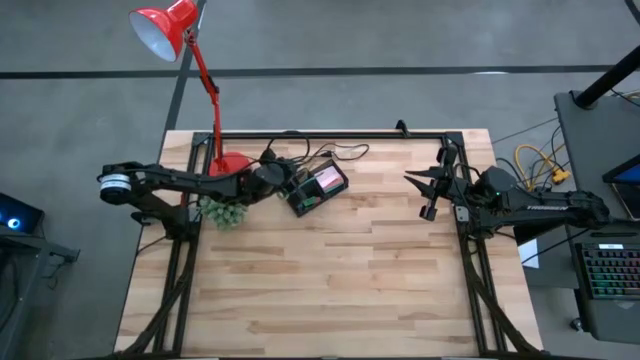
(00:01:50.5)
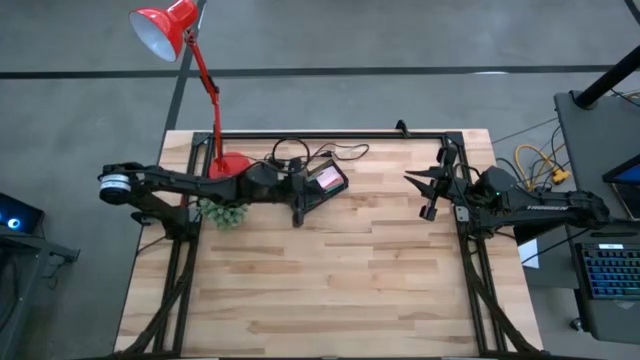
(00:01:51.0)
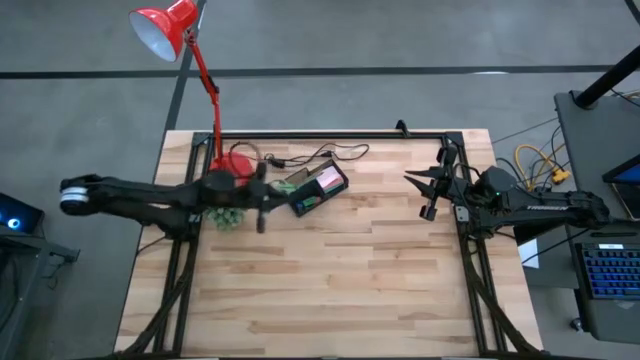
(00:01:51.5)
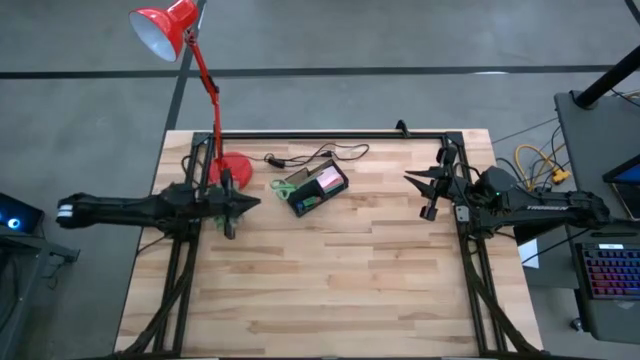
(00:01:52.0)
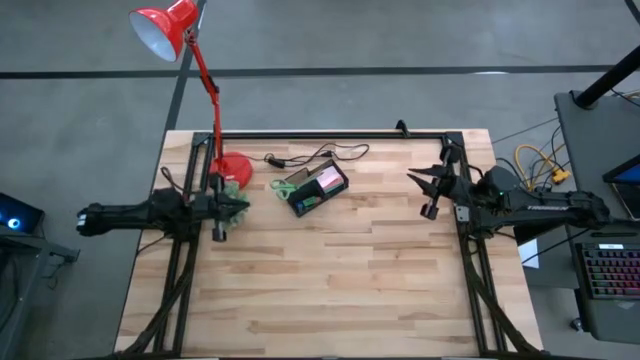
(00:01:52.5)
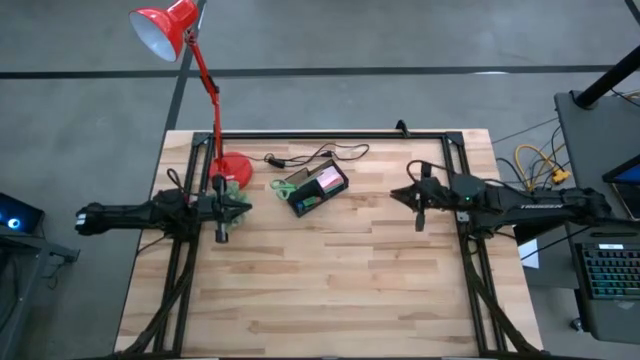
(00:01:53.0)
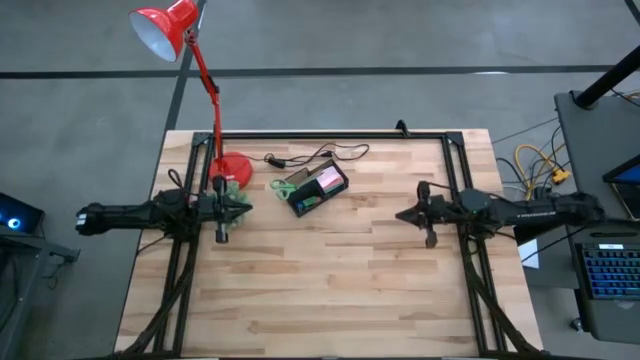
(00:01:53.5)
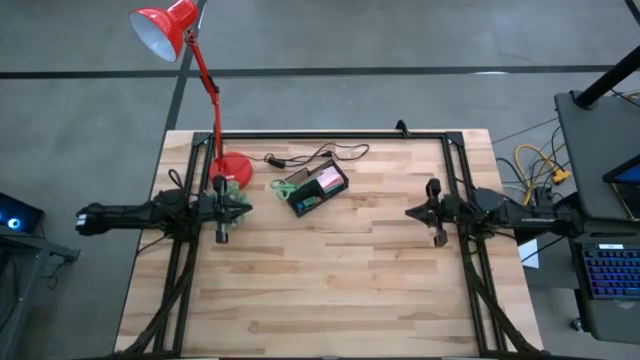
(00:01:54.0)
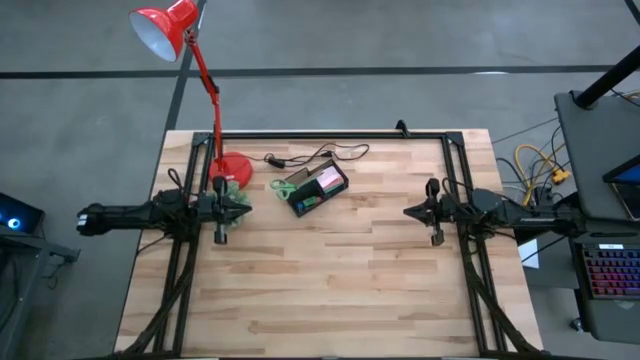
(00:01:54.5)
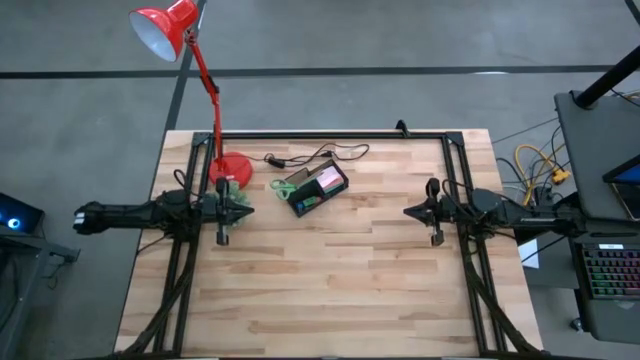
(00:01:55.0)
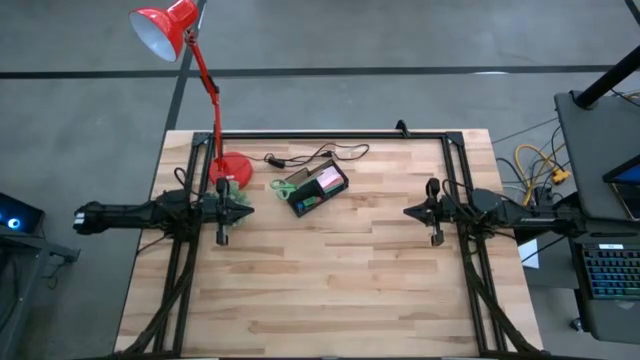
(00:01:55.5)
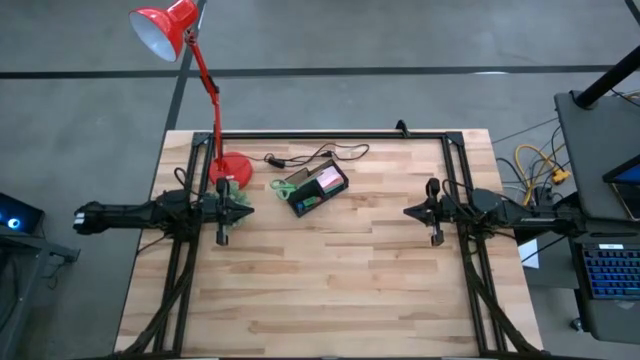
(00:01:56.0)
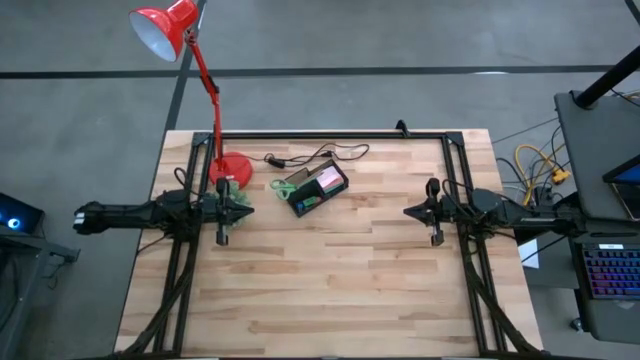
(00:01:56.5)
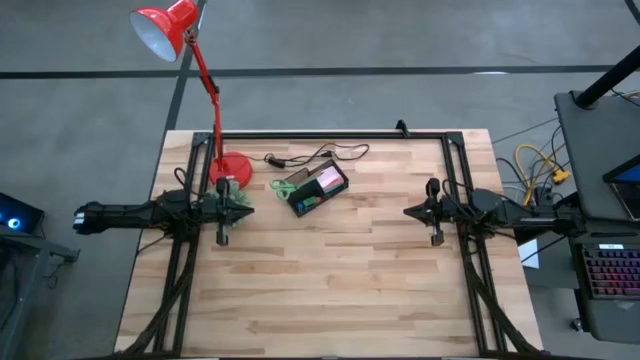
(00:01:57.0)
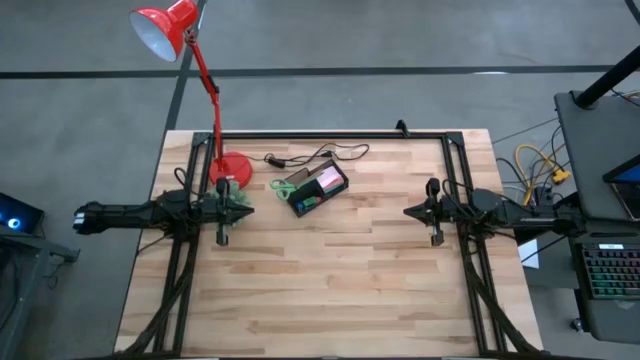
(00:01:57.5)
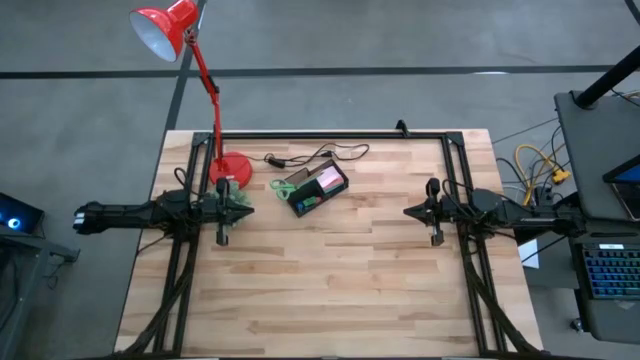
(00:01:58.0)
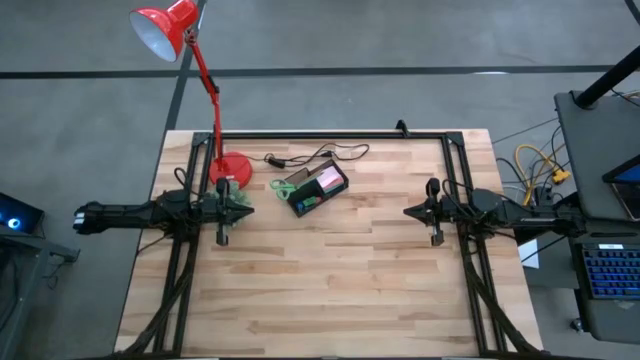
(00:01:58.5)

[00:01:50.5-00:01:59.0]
Task: Pick and place office supplies into organizer
Return to Home Position

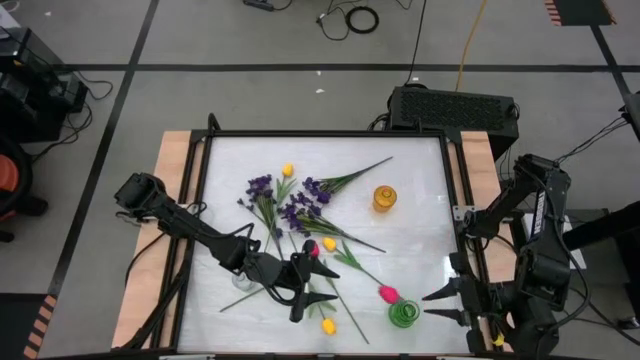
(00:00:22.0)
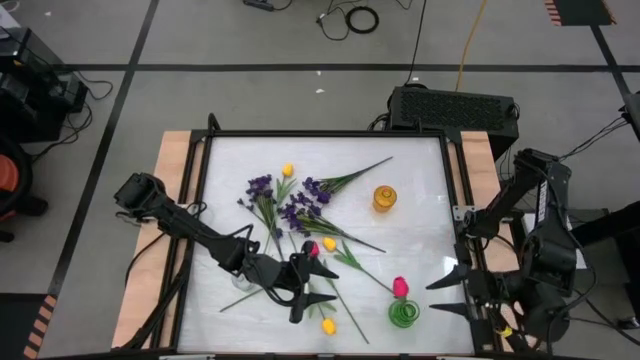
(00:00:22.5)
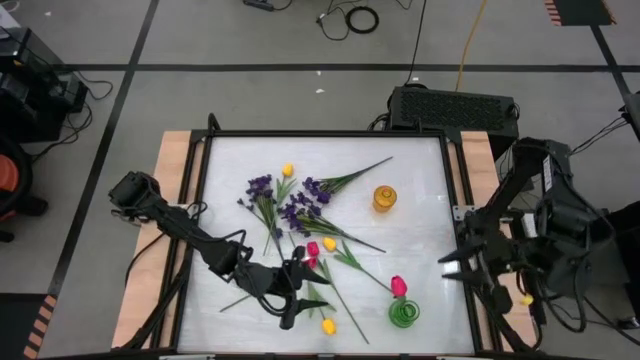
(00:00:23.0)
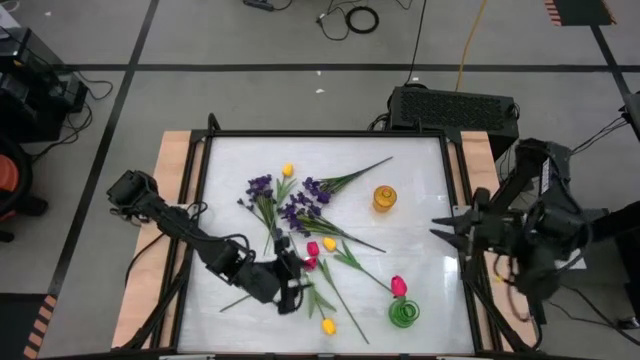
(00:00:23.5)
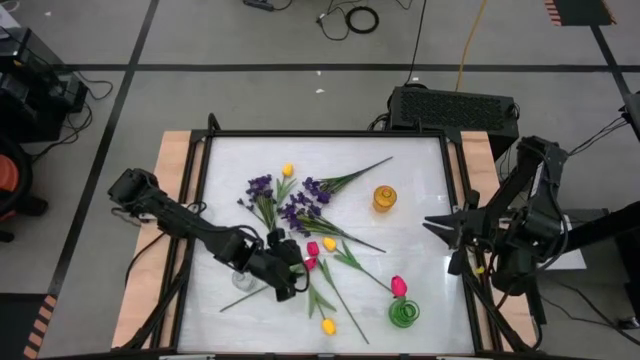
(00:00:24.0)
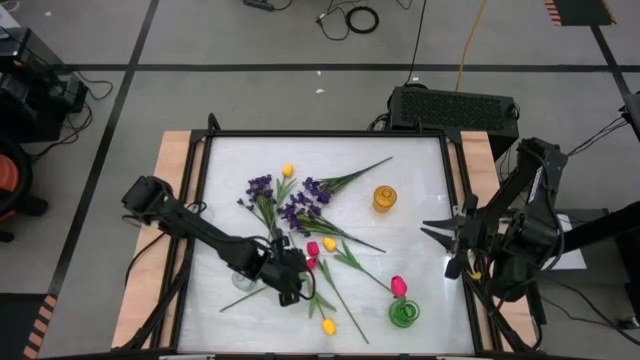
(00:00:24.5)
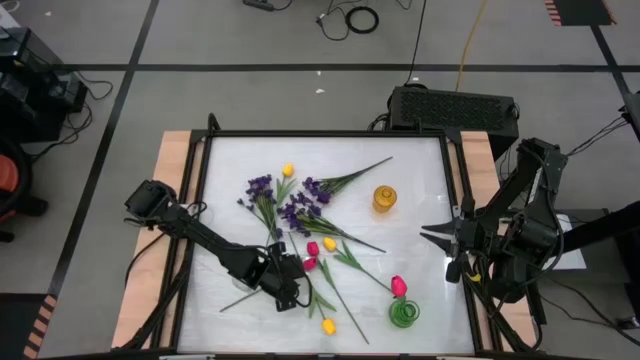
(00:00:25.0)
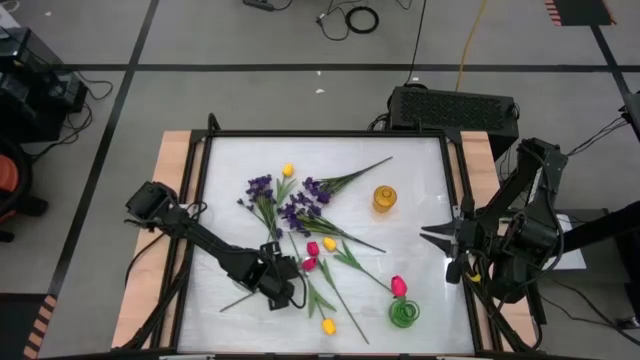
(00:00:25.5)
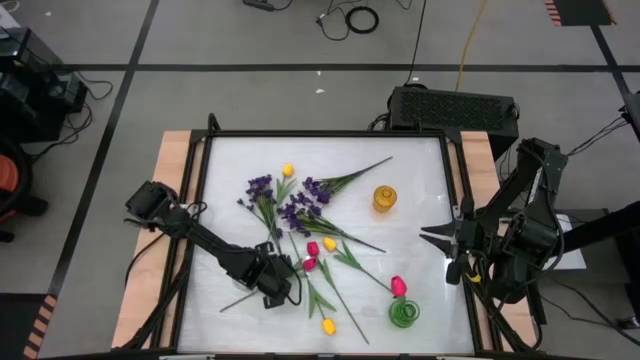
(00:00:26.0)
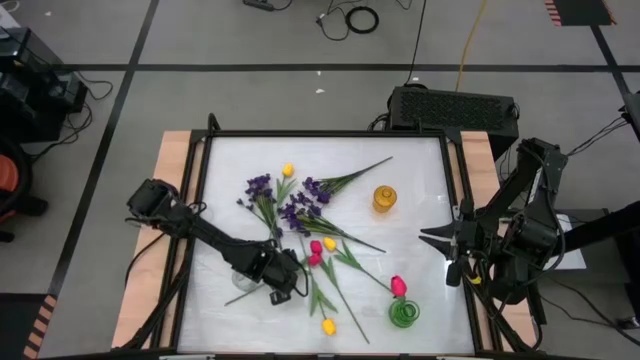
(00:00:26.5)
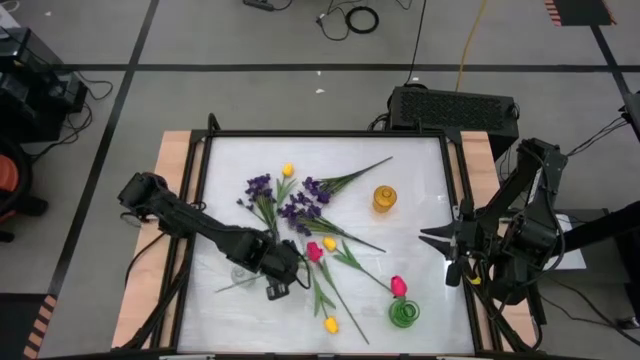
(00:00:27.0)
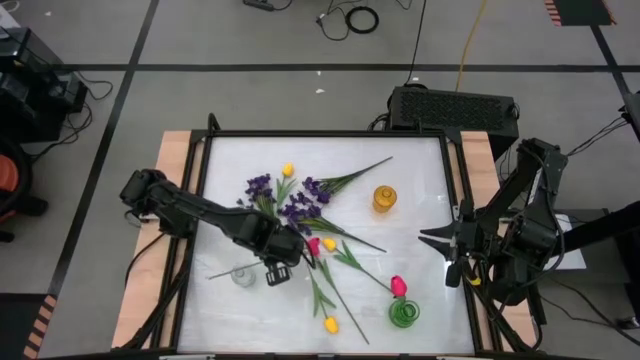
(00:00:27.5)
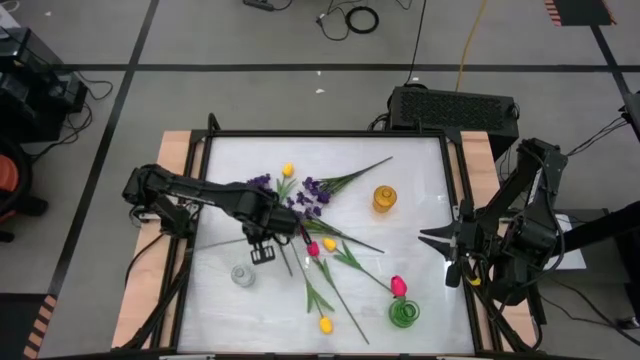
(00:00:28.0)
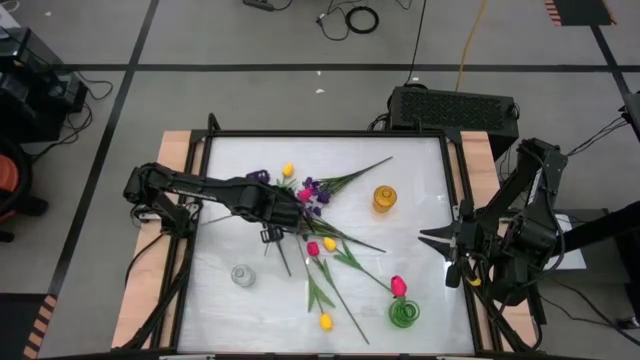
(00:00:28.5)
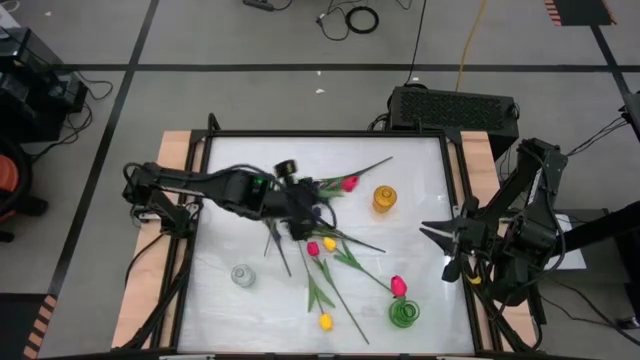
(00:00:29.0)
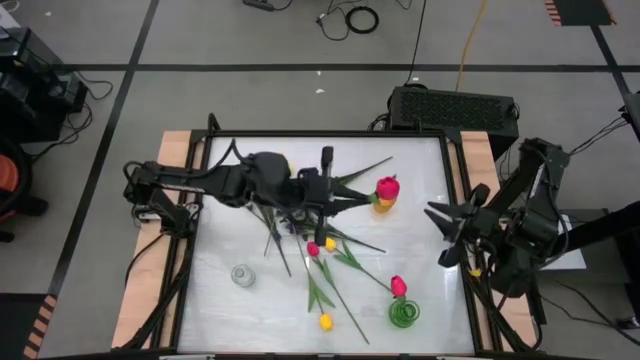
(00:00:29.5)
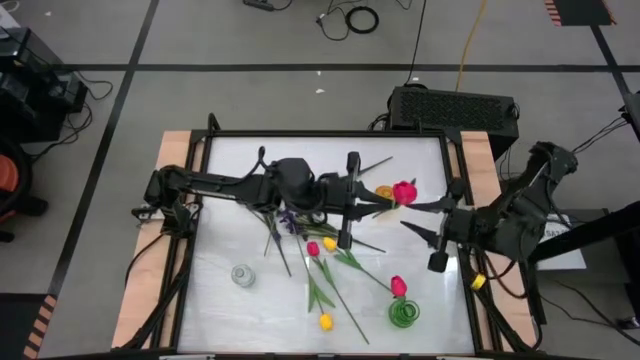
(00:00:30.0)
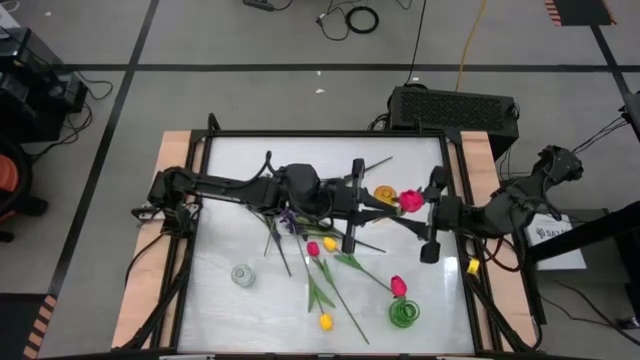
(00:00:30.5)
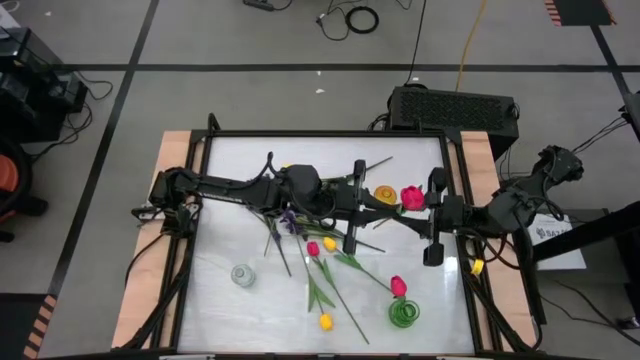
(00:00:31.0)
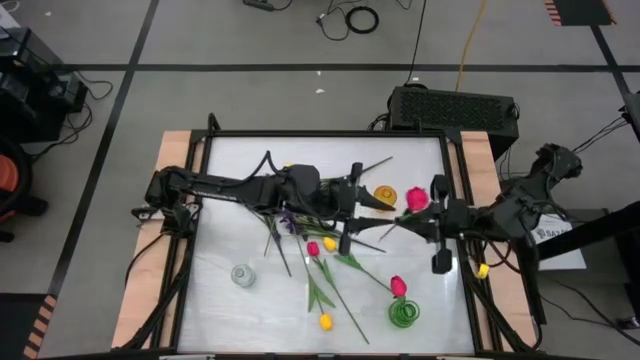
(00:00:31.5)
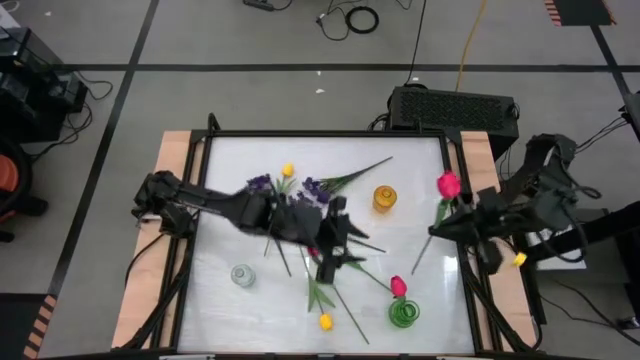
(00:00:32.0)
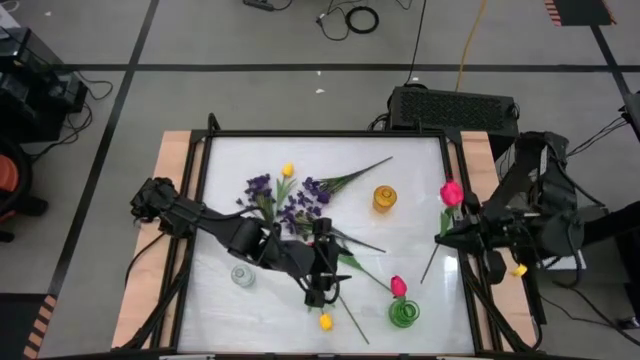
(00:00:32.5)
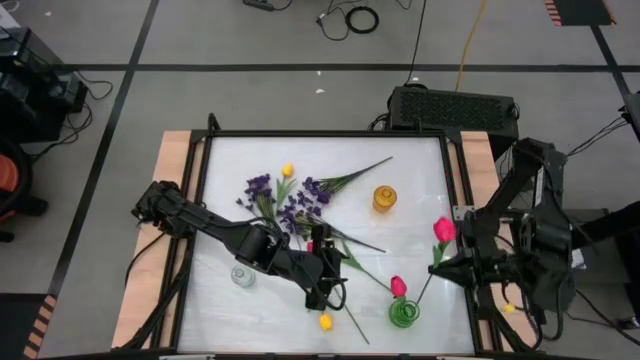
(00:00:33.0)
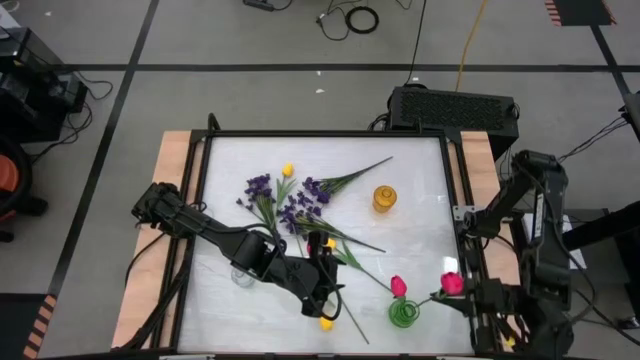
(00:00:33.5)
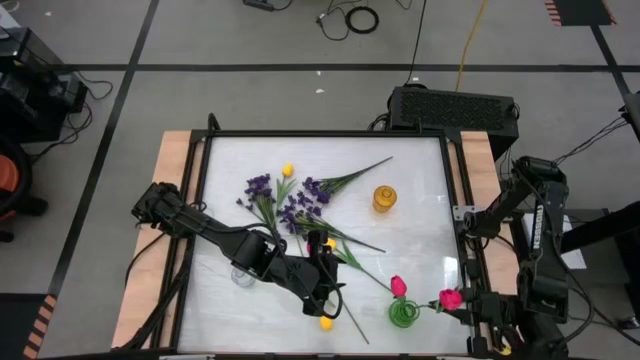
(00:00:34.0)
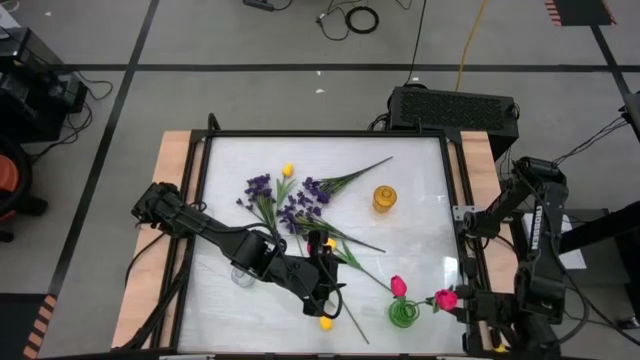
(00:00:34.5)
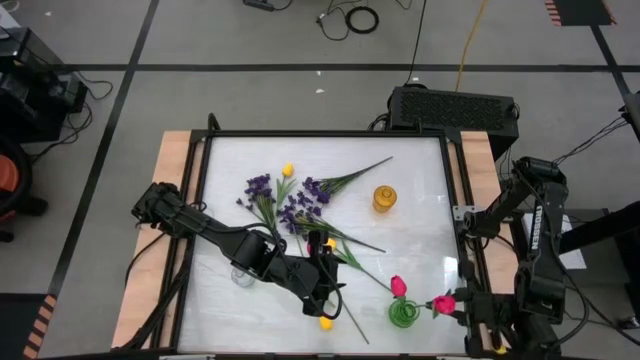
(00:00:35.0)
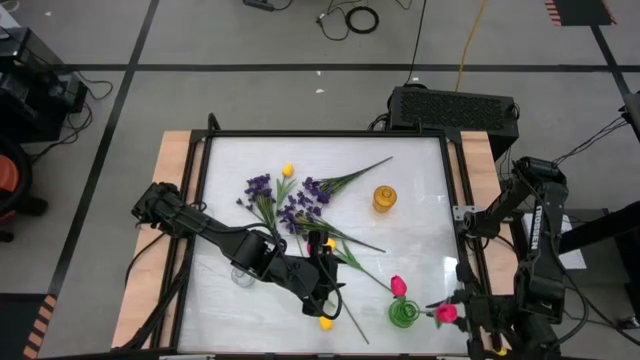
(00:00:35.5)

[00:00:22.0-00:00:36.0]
Task: Sort flowers into vase by color
Put the bottom red flower into the green vase
